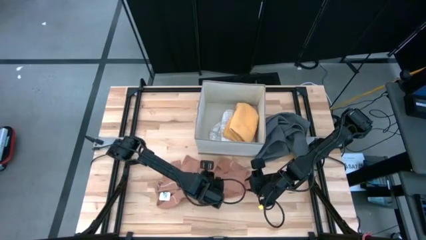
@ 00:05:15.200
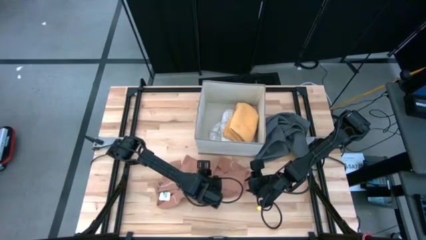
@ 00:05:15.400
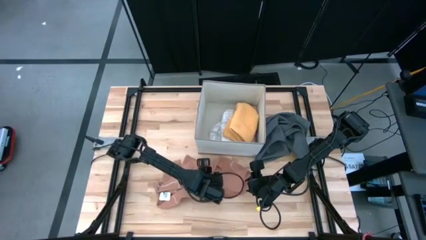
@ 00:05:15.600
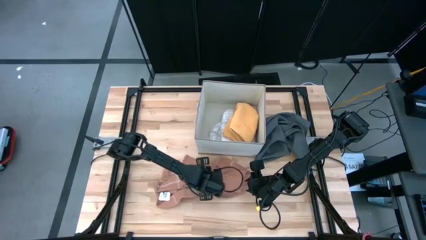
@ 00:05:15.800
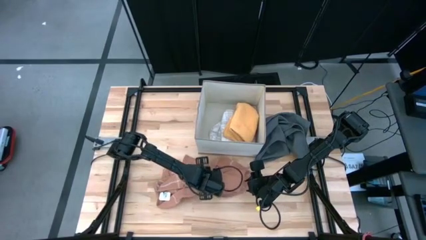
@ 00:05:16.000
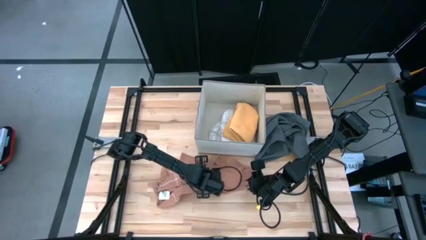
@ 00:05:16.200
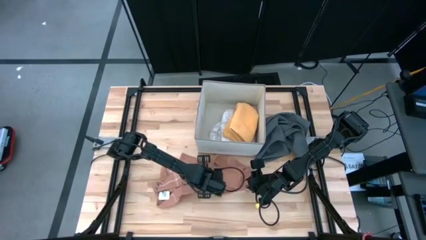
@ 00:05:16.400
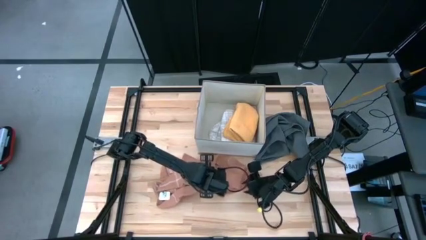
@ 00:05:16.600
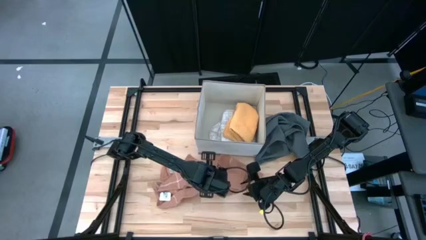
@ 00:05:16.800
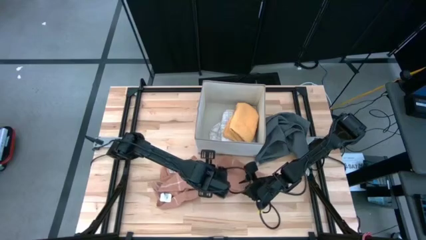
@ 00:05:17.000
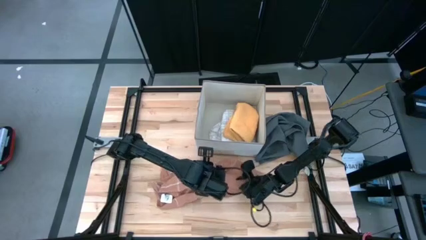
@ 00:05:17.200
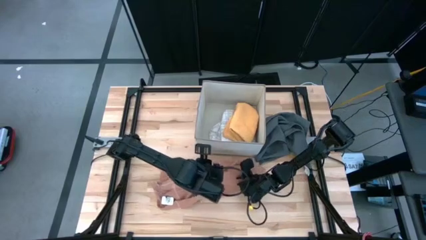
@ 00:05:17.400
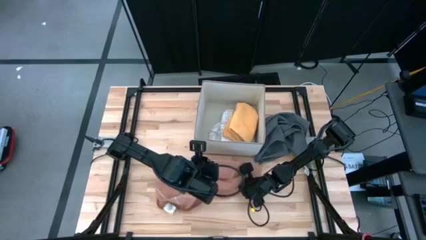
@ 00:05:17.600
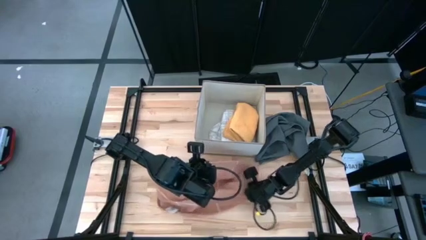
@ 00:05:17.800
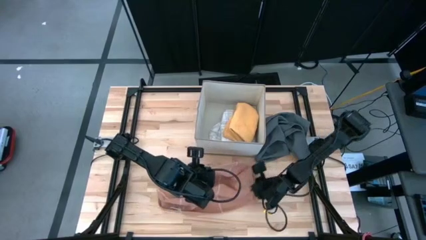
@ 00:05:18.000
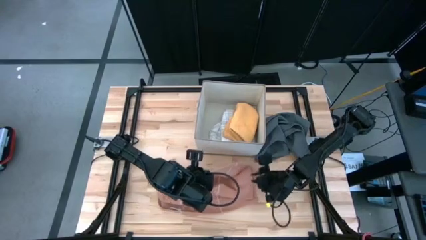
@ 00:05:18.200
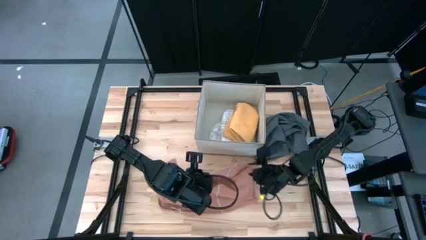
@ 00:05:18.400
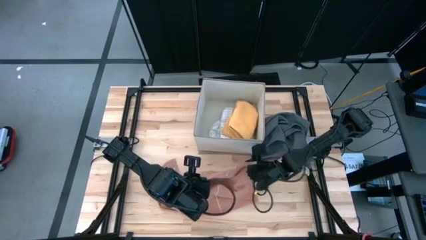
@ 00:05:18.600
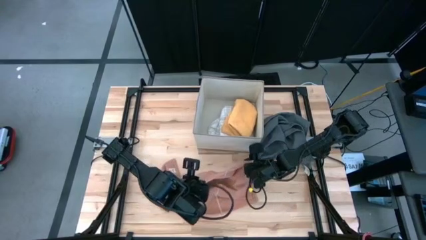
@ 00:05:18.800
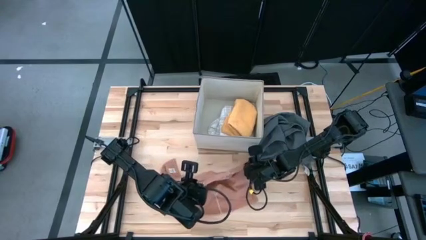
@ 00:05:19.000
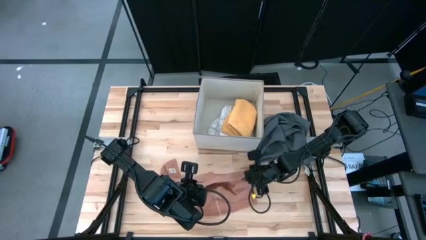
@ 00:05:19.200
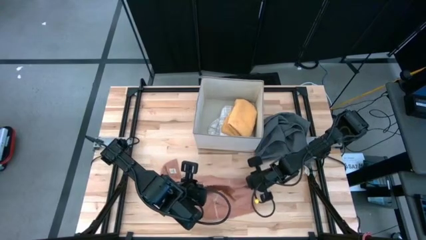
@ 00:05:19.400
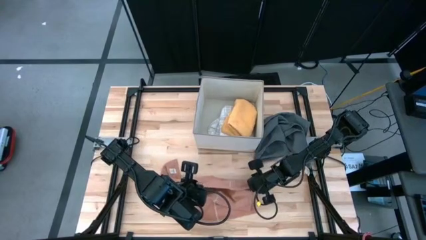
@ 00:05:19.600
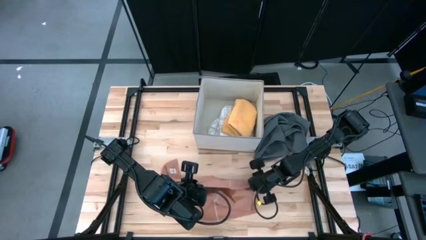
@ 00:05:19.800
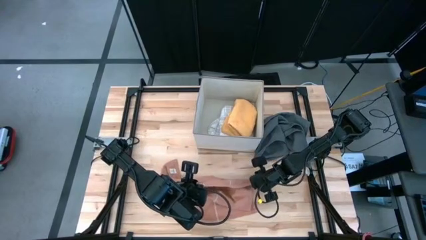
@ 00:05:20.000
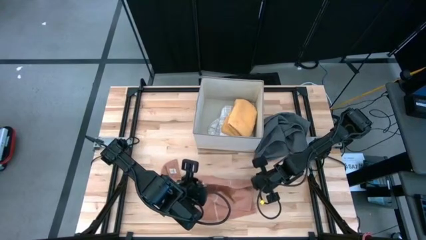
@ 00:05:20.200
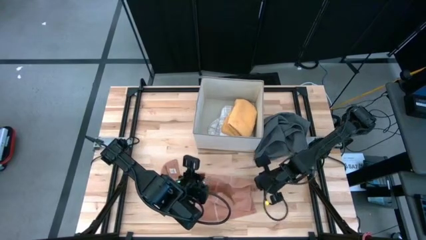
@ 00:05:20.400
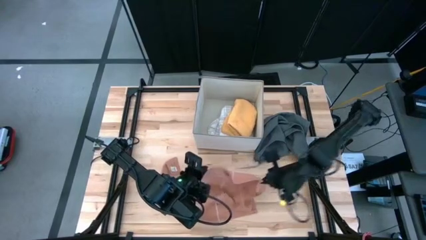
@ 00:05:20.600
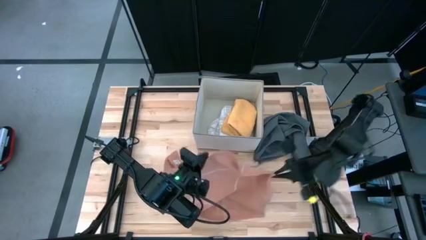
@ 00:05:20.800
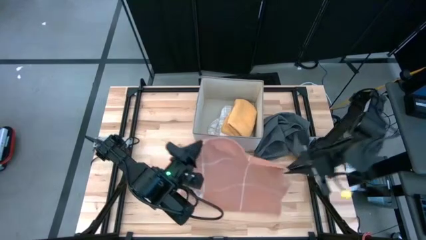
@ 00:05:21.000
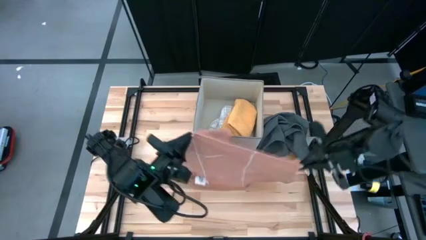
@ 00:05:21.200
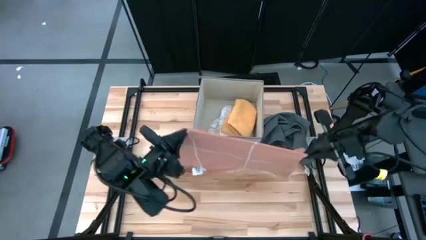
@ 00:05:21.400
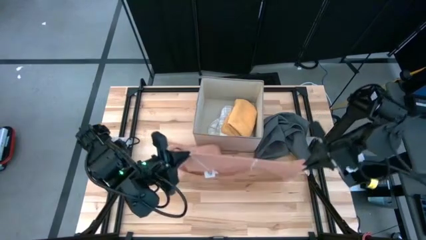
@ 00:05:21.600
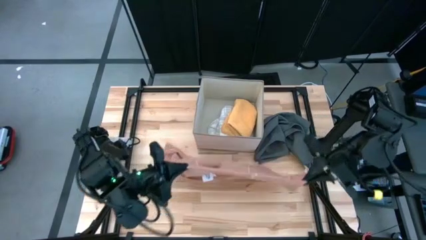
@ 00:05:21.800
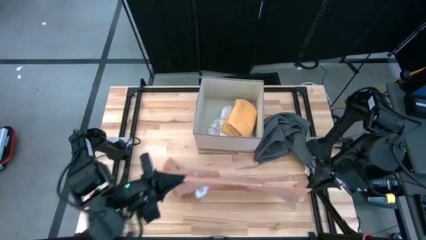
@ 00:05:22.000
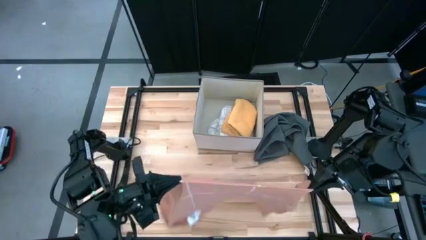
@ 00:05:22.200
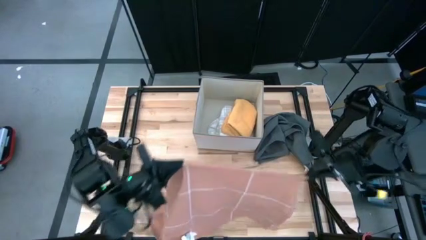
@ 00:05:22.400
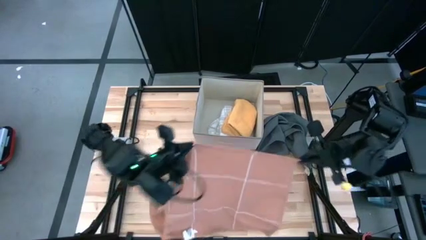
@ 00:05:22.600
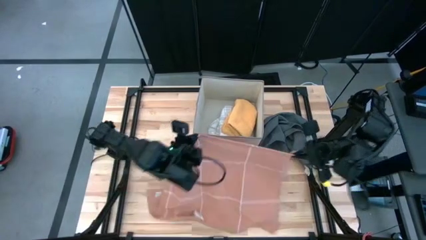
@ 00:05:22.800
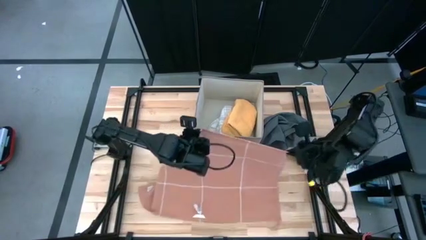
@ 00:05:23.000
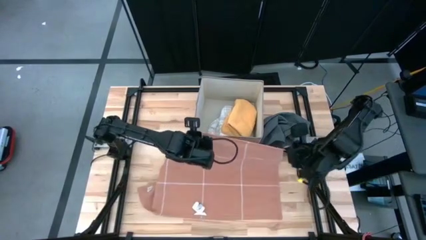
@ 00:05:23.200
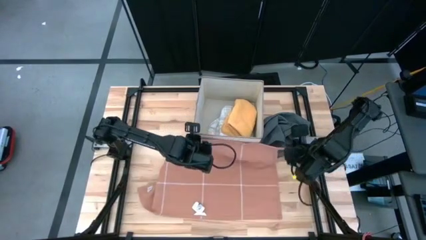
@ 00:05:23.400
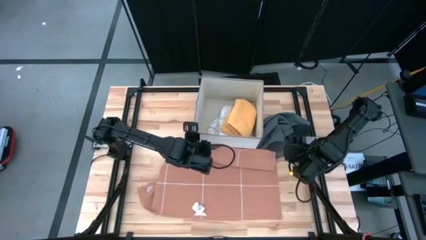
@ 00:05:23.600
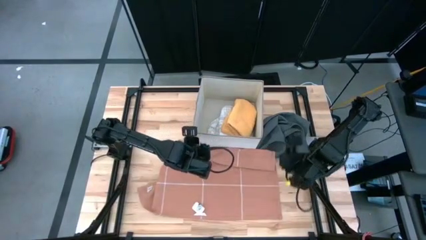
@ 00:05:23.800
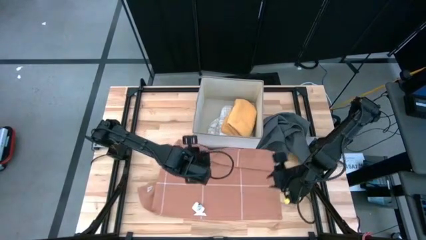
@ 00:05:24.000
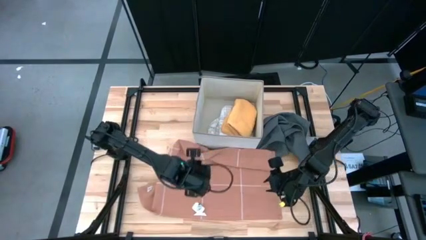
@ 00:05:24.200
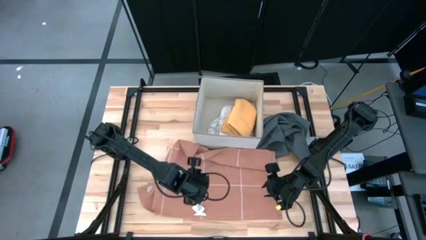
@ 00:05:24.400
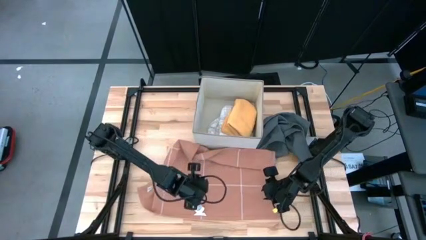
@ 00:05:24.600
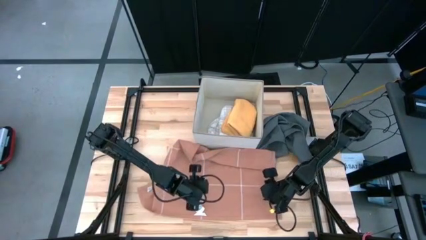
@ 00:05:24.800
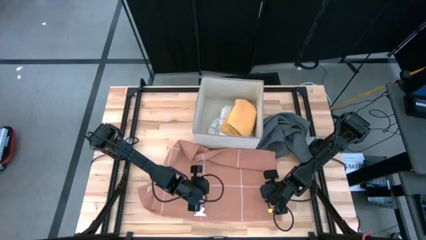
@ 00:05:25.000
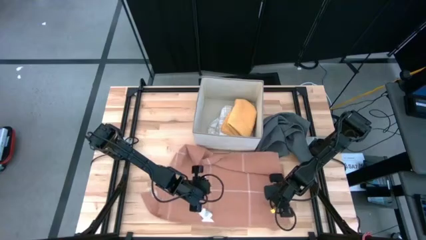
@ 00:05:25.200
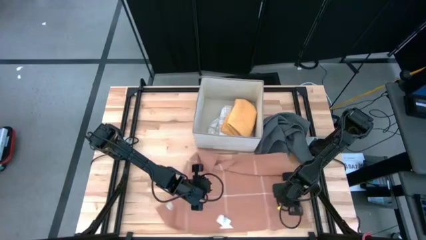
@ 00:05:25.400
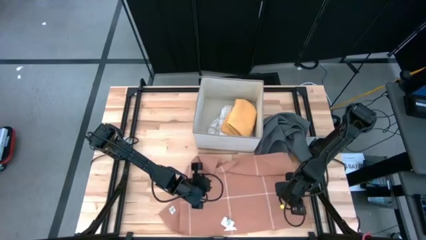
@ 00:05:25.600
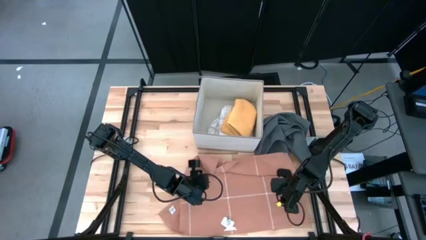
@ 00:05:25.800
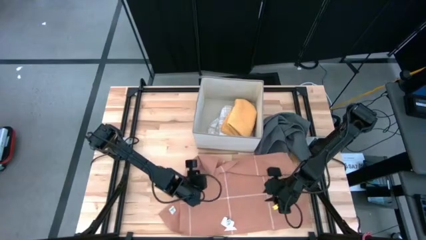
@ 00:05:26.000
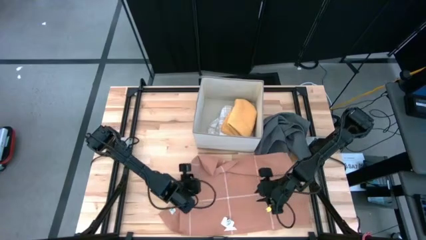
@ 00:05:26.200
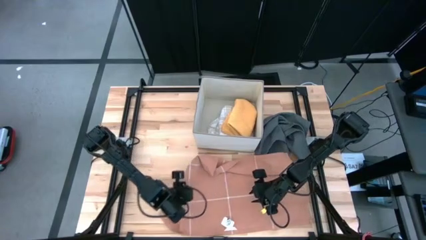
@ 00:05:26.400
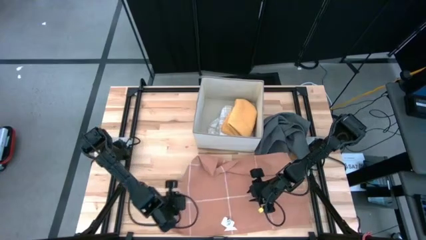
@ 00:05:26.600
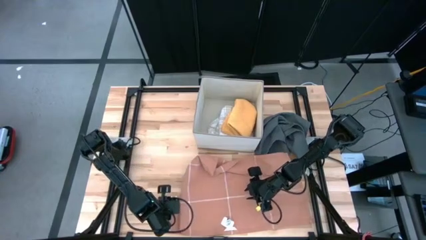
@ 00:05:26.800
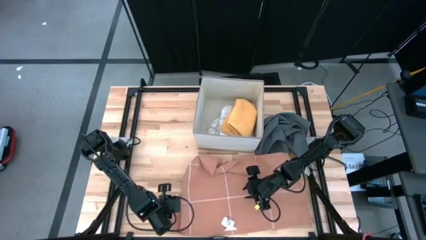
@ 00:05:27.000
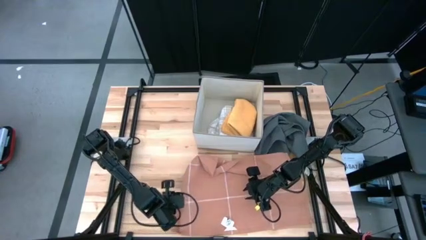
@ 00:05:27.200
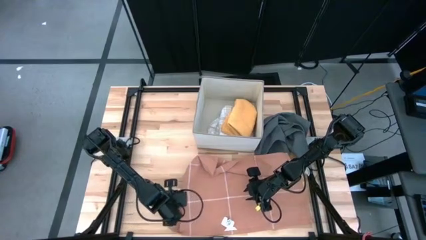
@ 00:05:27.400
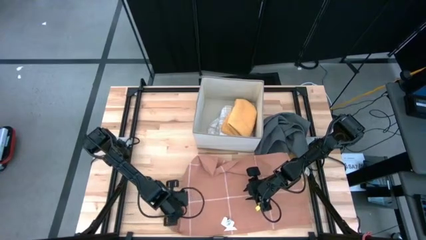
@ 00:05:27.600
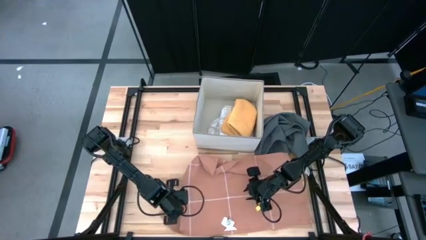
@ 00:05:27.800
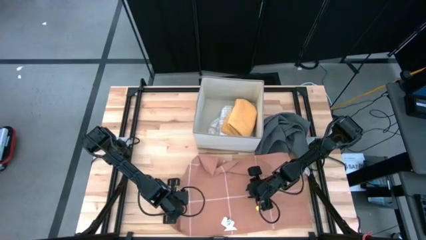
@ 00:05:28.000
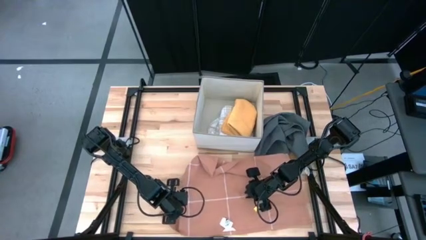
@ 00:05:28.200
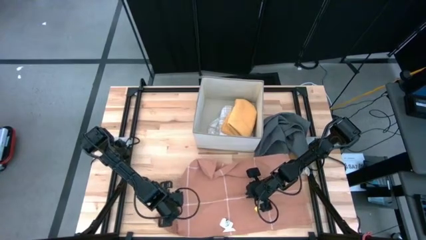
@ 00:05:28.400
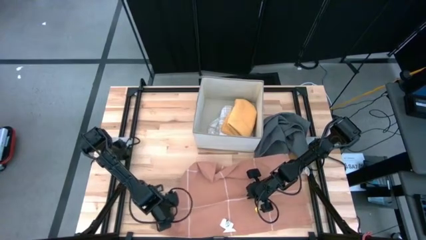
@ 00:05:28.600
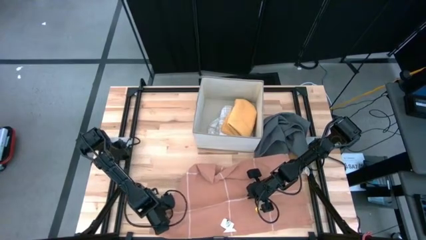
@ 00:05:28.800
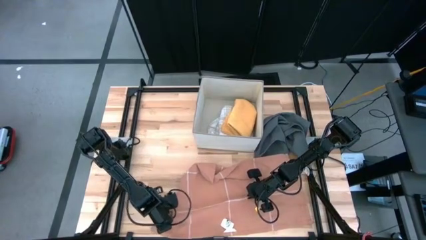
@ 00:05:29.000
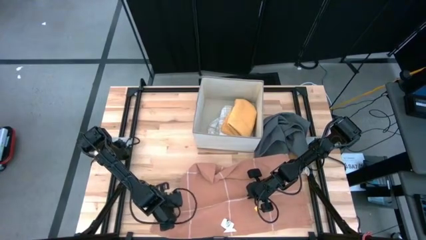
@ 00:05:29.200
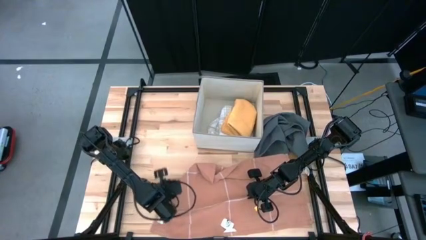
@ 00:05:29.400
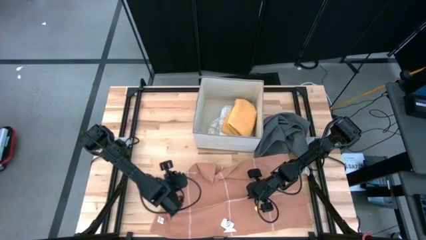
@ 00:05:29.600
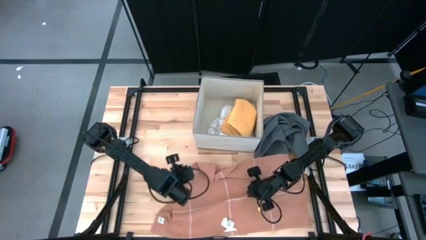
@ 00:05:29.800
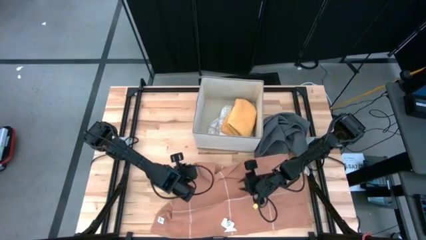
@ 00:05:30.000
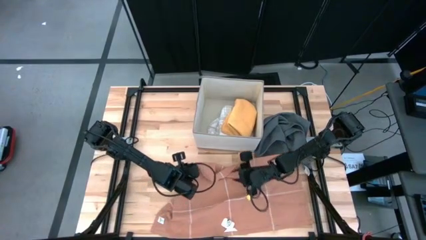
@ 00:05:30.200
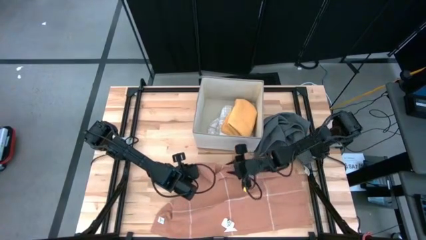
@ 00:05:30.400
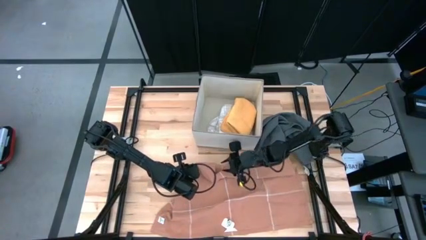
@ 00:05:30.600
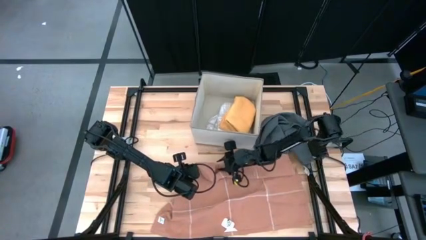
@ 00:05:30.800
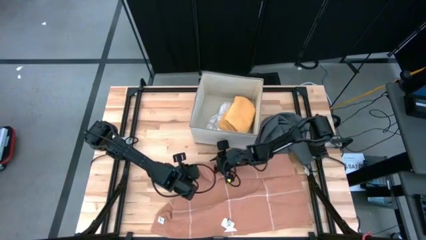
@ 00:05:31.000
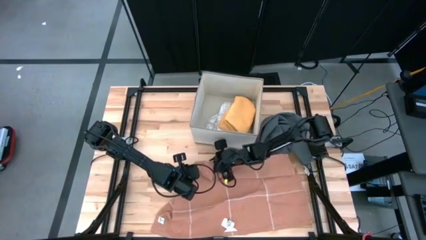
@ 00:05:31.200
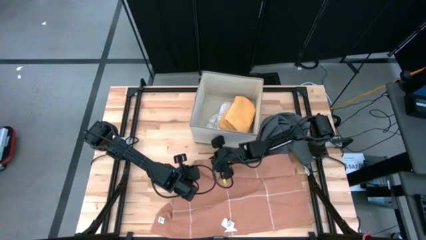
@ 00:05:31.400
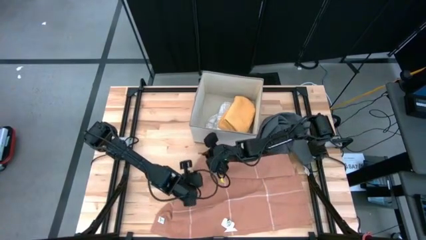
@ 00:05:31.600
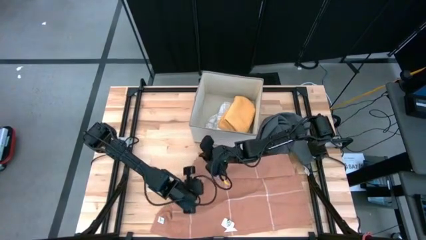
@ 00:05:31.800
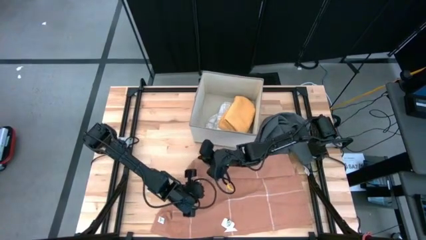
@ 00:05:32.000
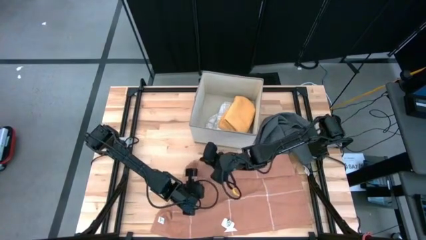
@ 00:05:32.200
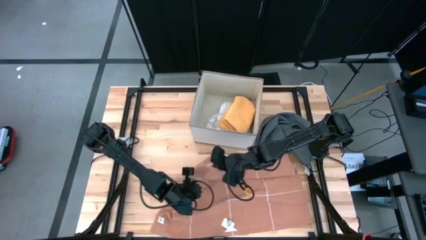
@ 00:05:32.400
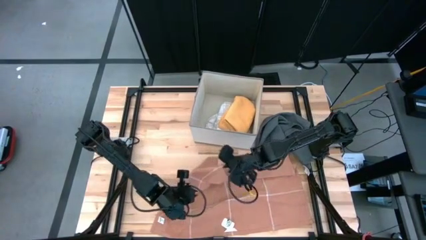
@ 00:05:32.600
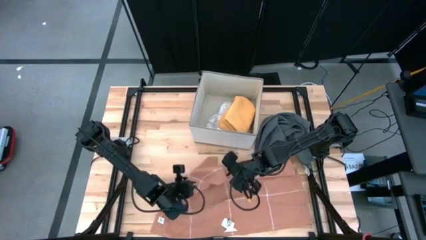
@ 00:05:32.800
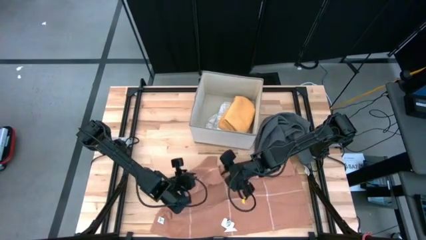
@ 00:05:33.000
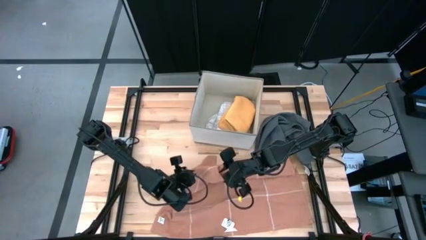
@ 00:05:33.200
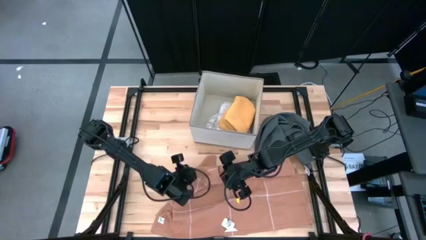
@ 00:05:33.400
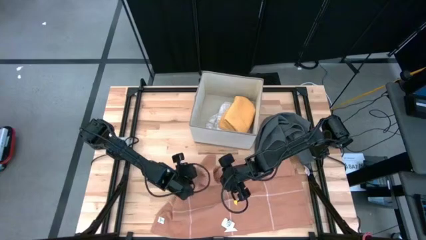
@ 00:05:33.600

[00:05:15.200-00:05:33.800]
Task: Fold towel
Fold the light orange towel
